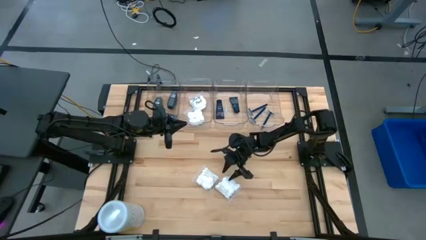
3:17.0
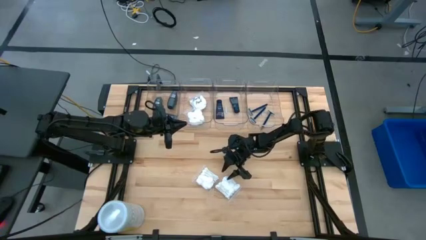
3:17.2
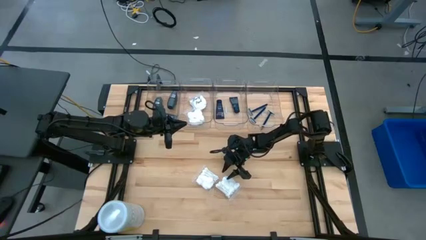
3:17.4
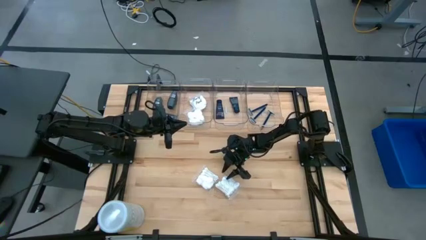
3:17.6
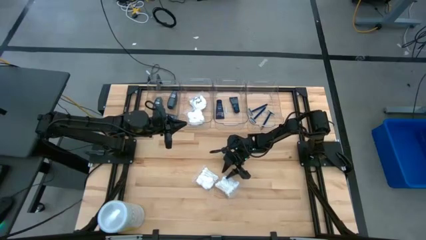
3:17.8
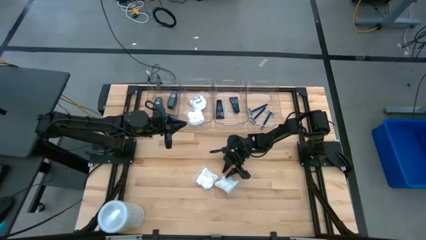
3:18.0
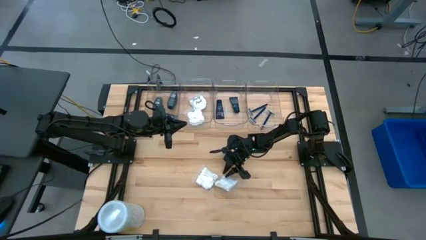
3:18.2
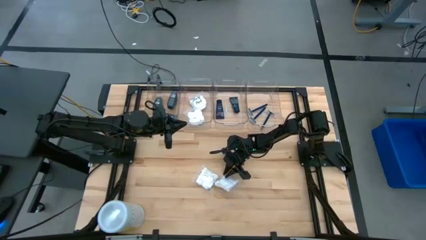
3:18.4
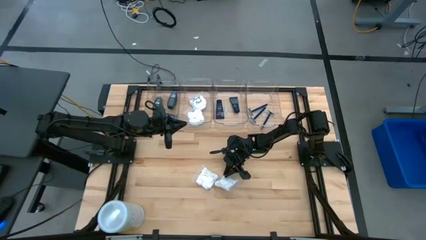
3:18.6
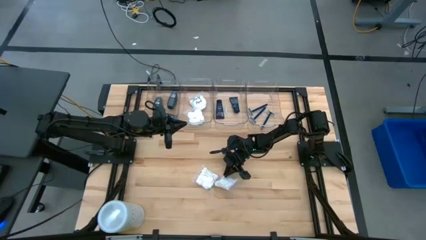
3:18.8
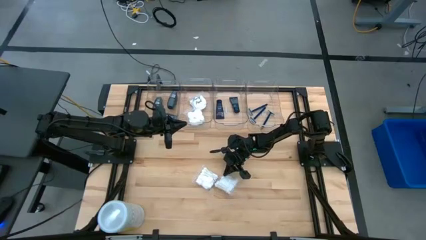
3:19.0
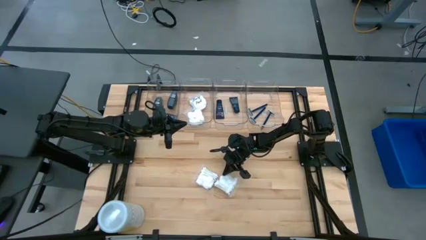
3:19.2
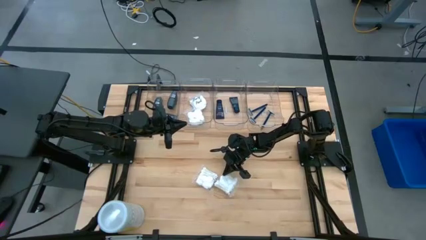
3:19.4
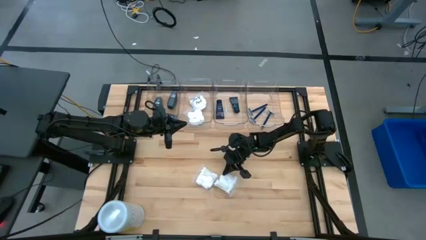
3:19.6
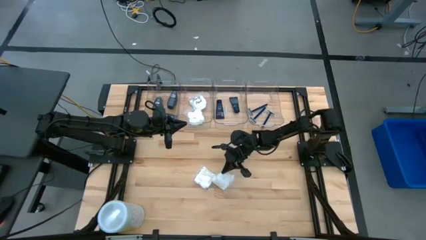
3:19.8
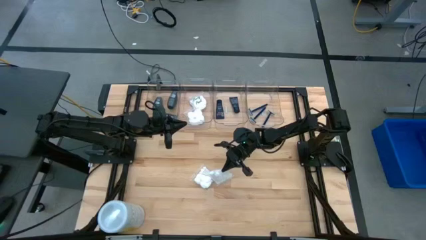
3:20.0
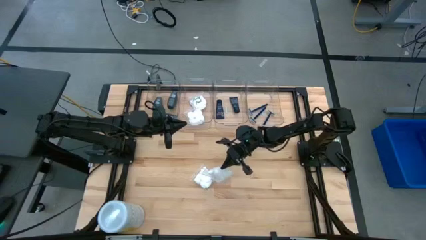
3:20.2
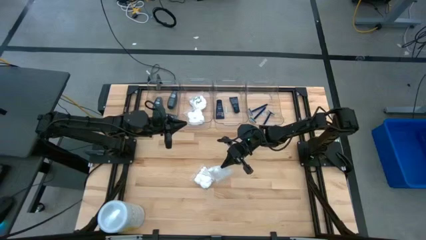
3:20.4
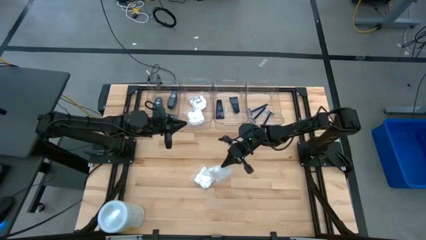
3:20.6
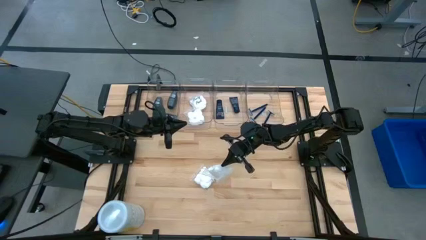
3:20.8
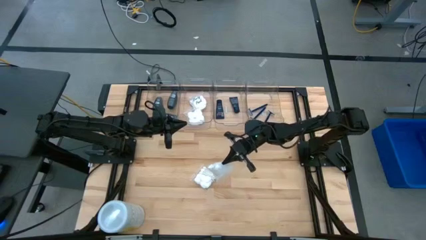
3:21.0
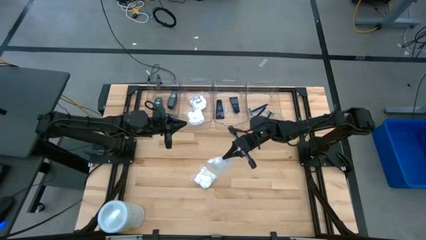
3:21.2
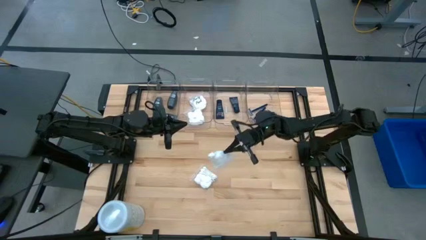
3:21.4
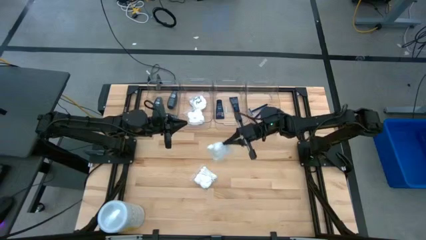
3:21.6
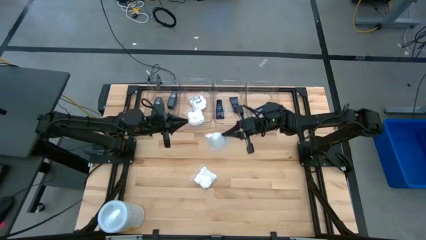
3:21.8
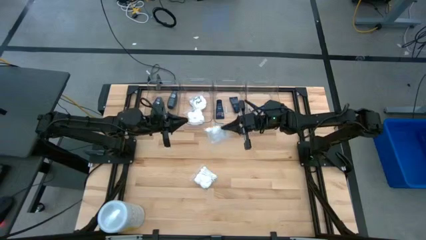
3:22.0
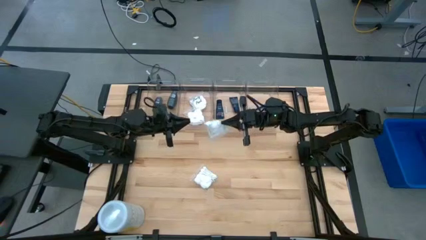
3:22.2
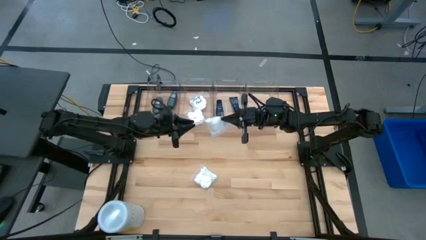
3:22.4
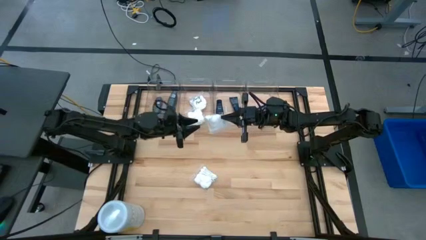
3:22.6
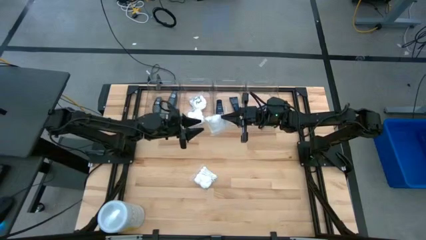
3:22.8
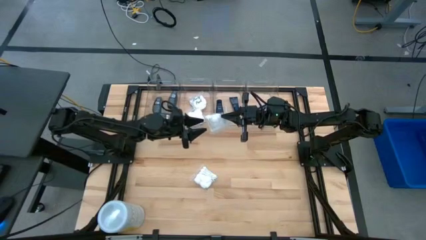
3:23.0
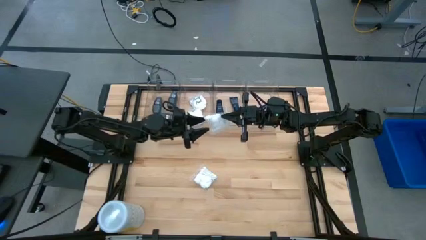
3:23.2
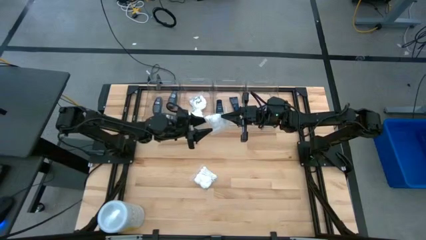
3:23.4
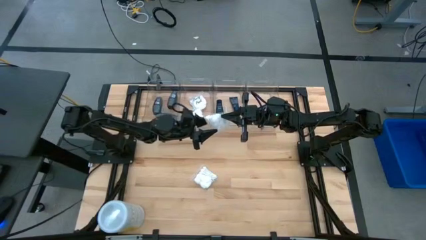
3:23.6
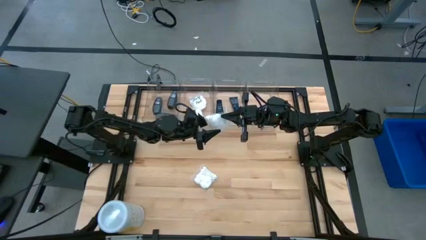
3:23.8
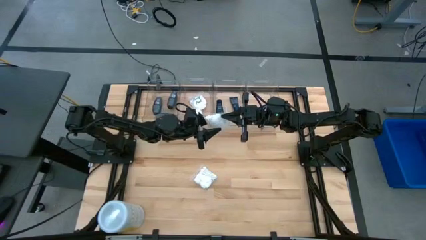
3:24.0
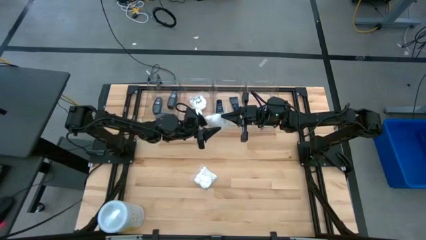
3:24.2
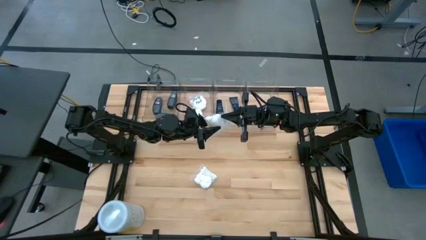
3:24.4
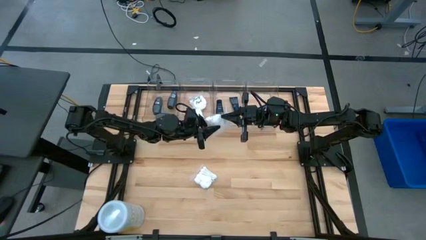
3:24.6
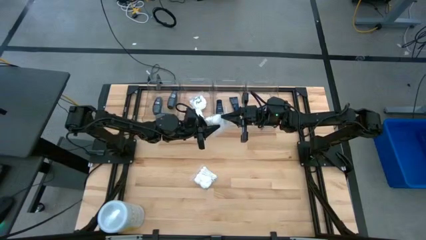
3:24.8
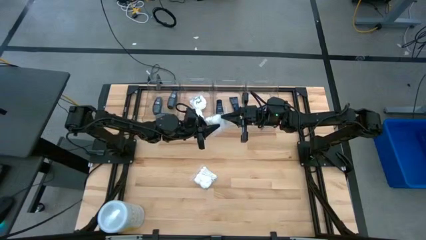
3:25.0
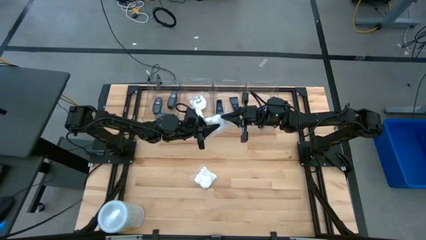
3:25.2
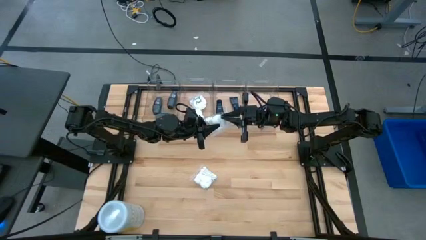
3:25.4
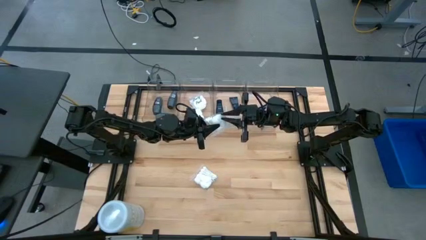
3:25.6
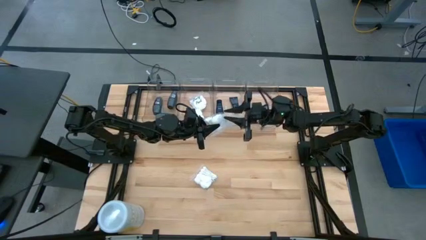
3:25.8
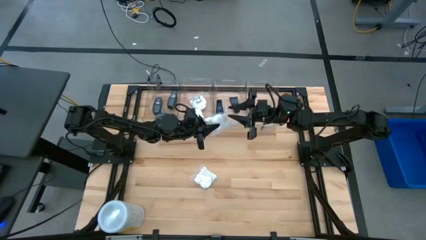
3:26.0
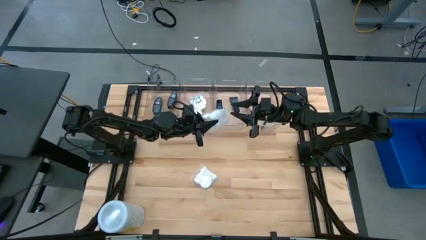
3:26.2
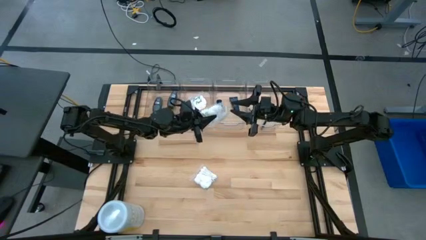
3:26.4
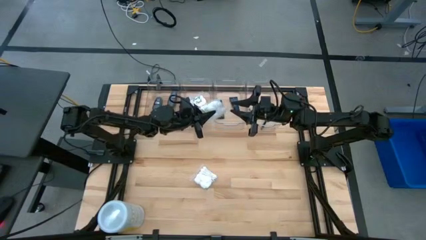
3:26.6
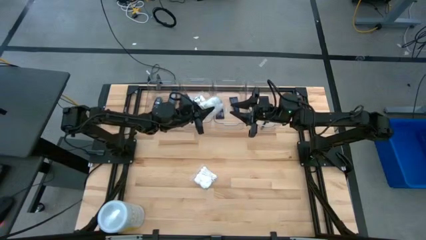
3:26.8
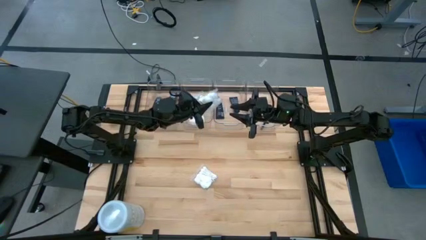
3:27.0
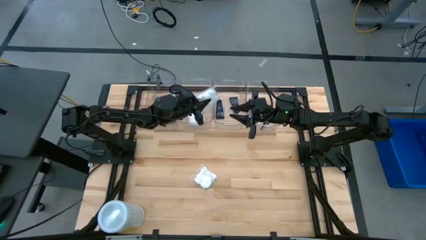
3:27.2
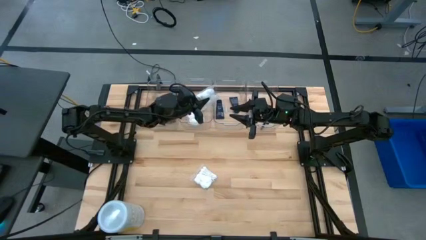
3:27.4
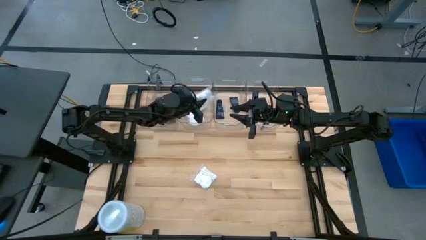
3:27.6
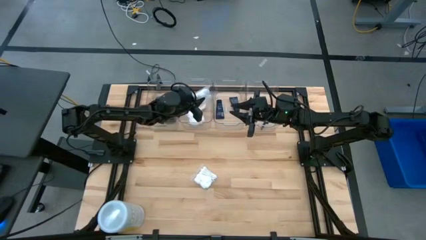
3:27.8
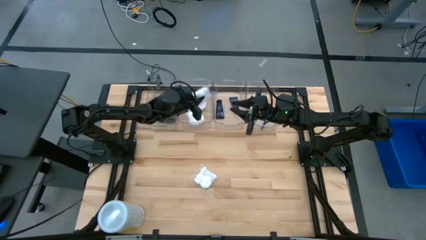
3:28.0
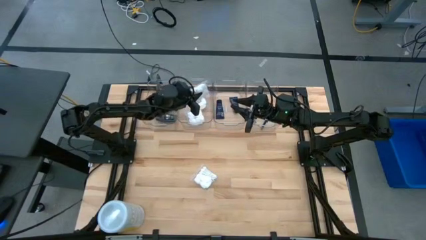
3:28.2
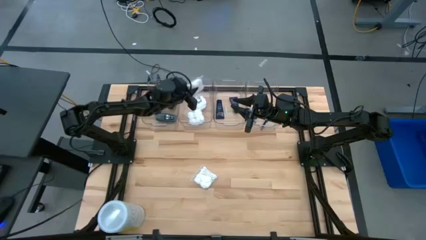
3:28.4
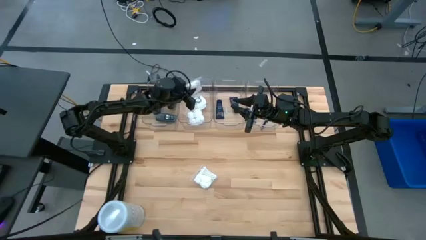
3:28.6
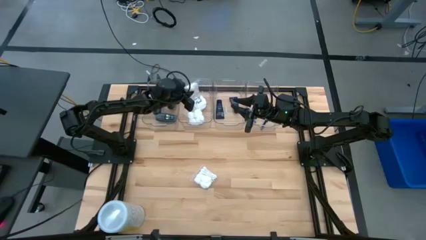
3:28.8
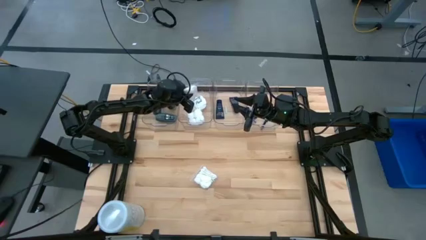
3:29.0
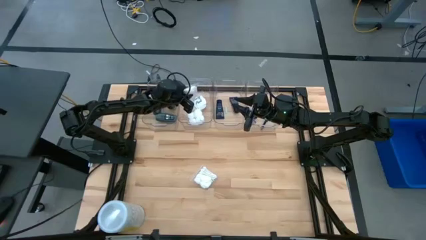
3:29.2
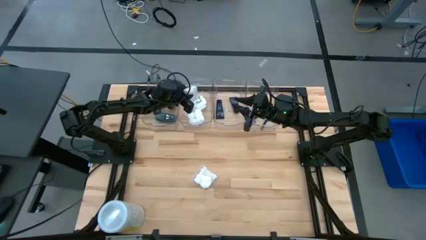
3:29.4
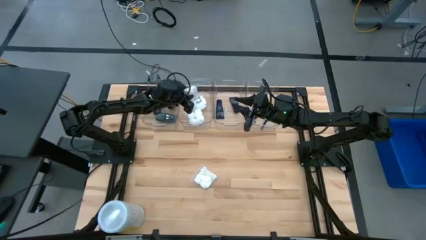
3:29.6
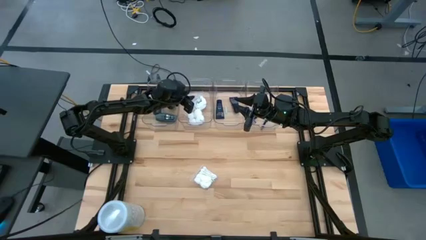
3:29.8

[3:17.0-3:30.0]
Task: Pick & Place Travel size toiletries
Put the white vanity pack into the middle left transparent bin

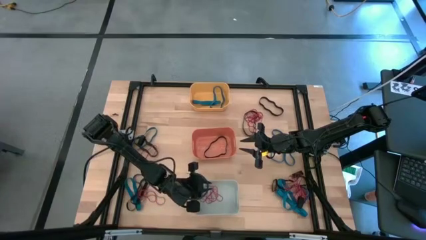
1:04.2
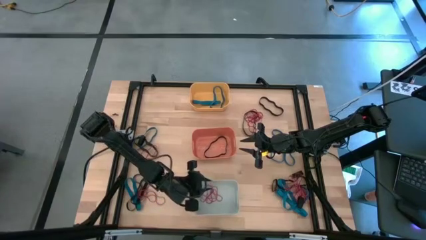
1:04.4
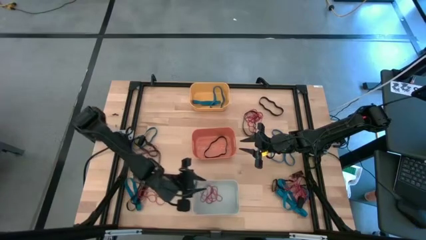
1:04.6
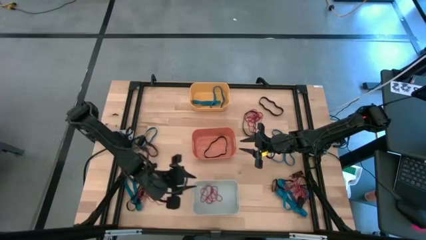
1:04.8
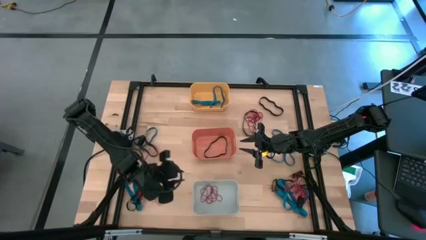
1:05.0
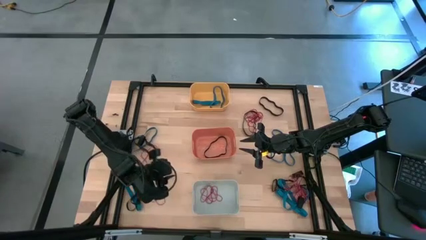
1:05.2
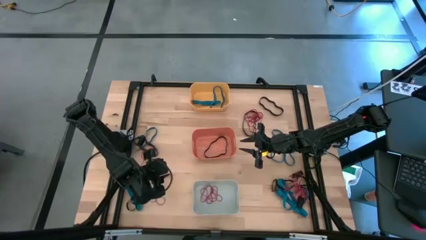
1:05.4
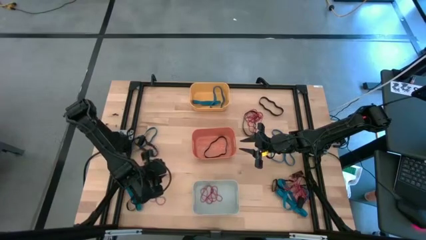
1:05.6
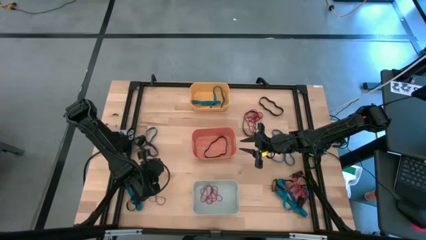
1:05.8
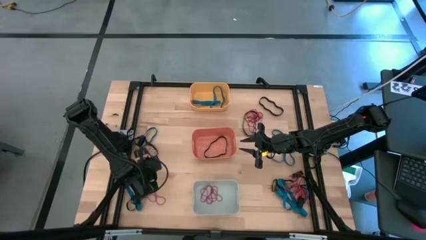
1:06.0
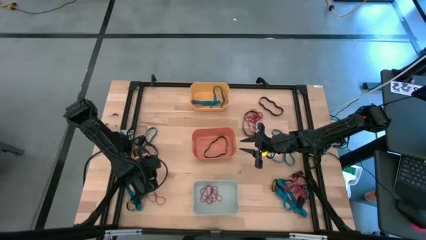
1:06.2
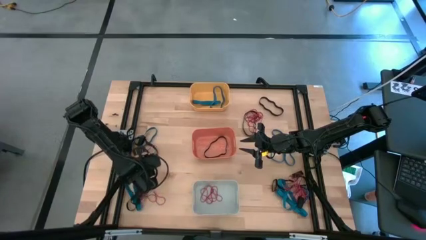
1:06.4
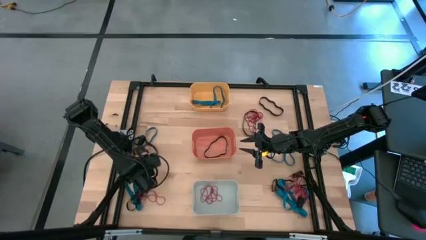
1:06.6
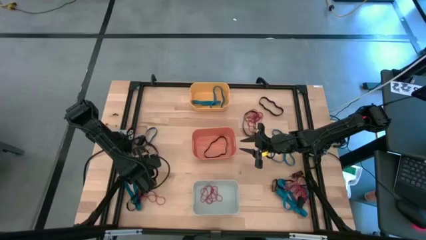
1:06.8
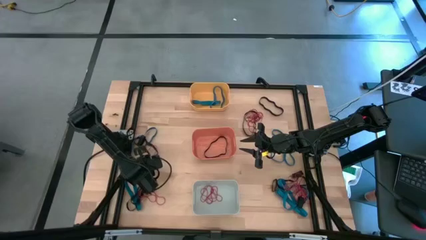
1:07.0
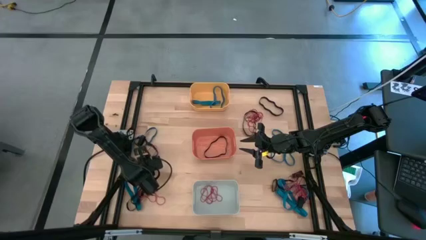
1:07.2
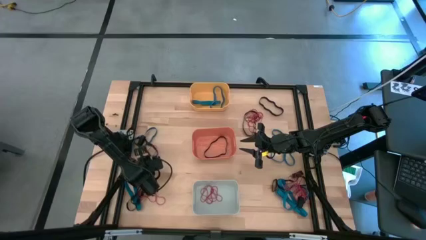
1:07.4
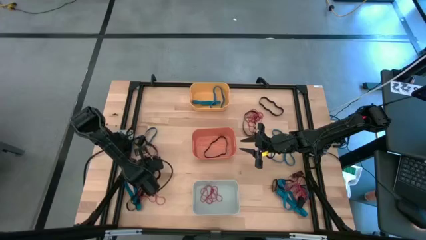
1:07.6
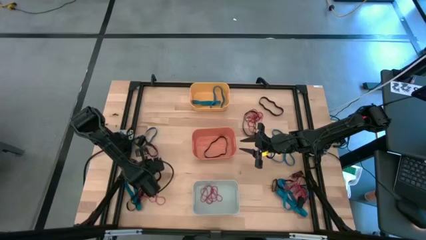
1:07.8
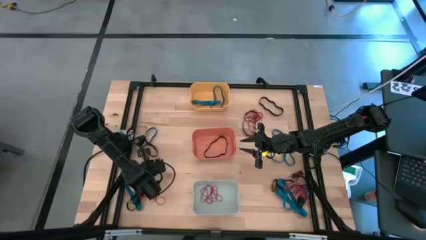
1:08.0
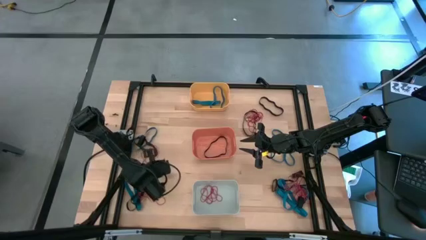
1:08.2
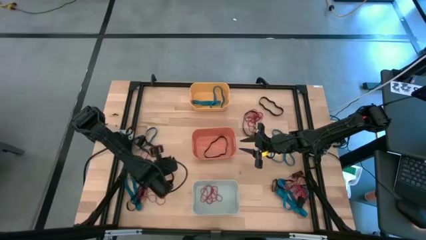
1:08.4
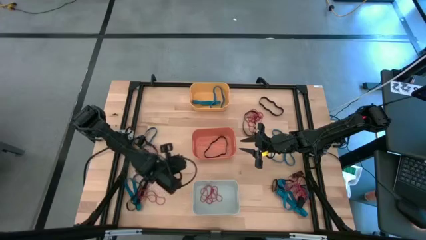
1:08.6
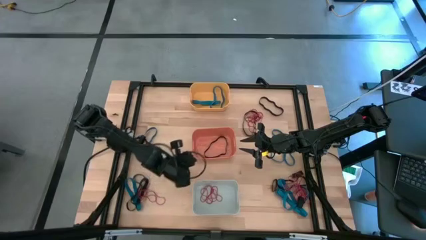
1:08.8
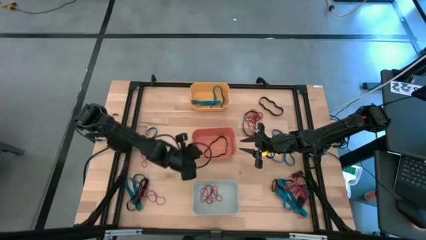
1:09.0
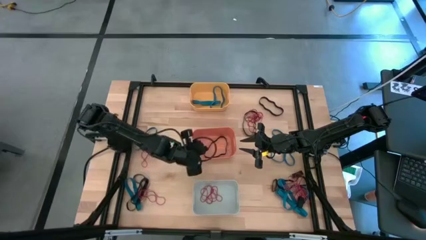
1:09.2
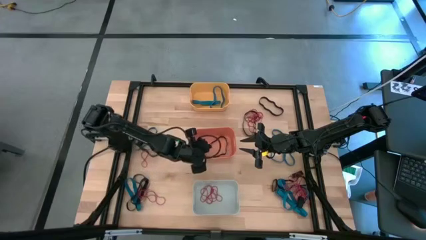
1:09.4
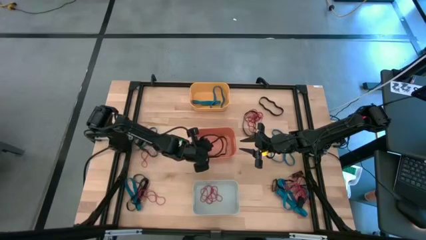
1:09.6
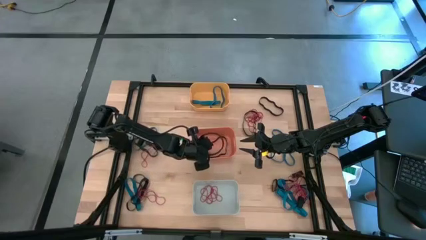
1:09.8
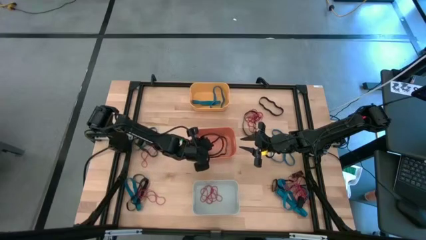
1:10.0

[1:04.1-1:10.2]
Task: Sort rubber bands into baskets
Put the black rubber band in the orange bin
